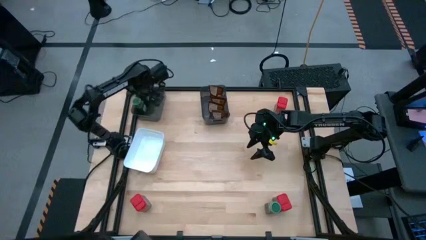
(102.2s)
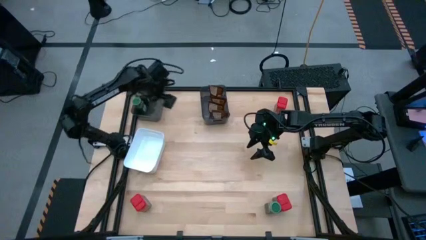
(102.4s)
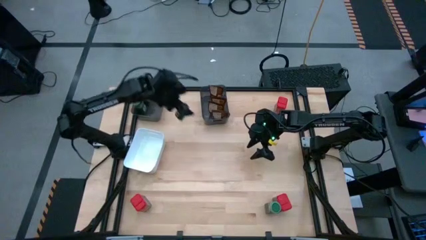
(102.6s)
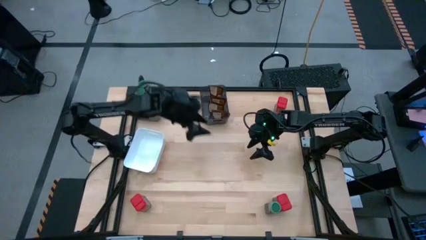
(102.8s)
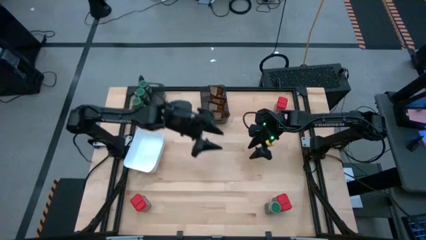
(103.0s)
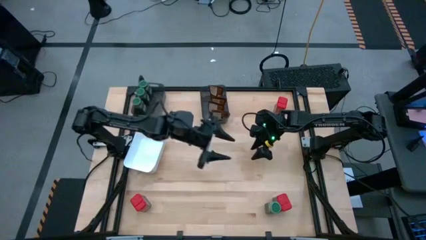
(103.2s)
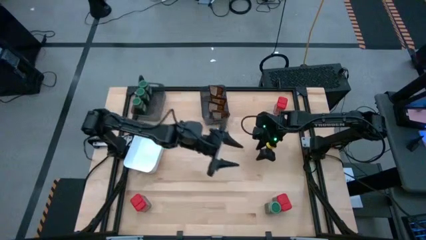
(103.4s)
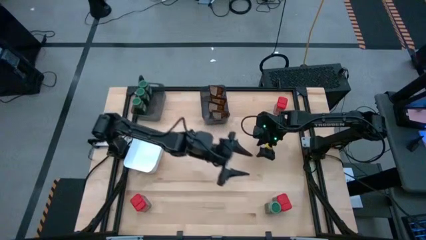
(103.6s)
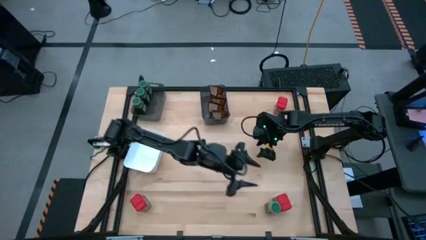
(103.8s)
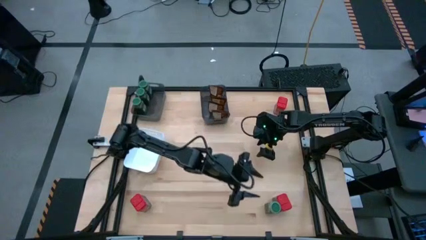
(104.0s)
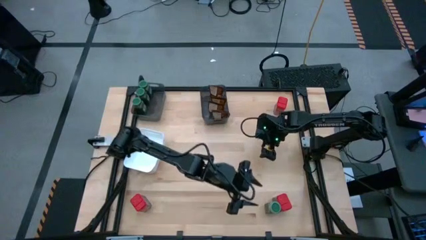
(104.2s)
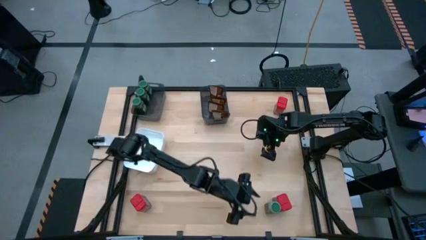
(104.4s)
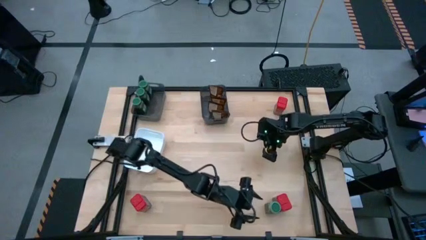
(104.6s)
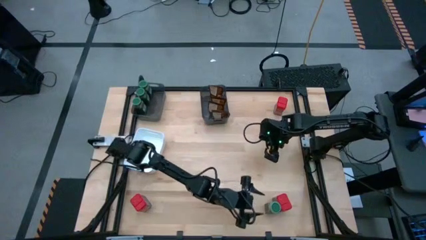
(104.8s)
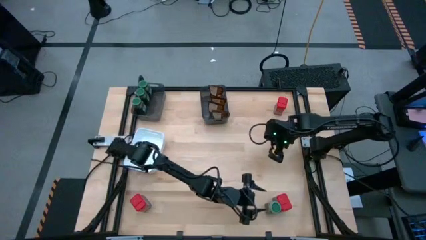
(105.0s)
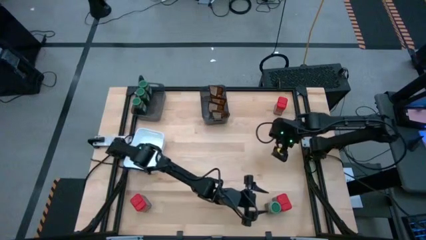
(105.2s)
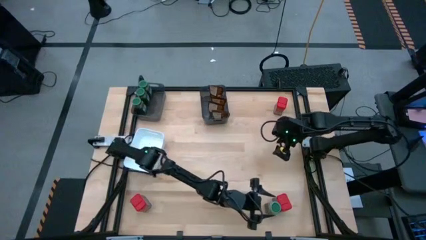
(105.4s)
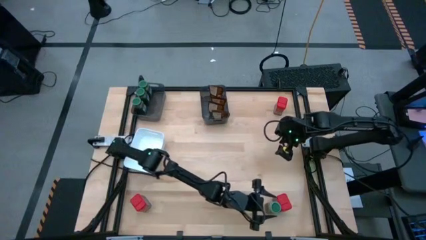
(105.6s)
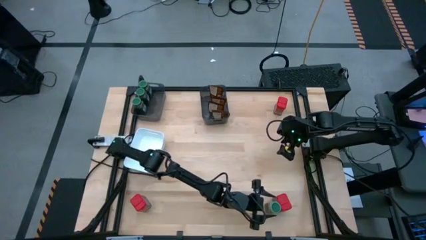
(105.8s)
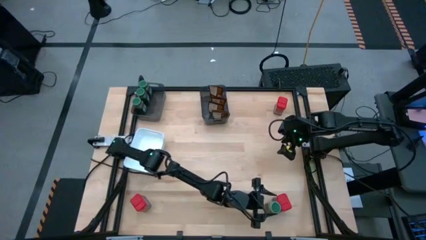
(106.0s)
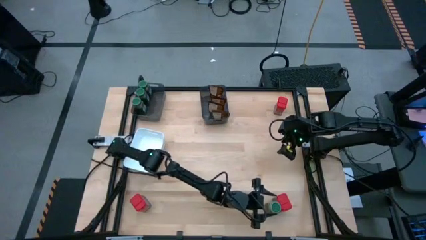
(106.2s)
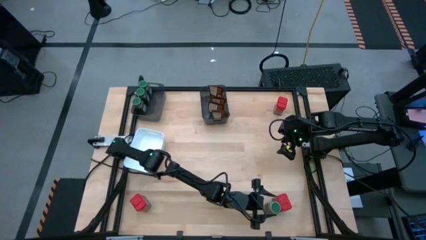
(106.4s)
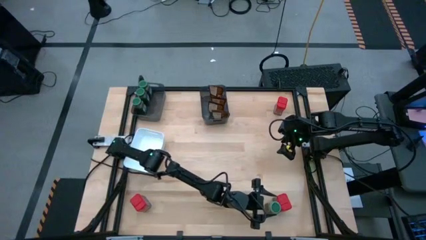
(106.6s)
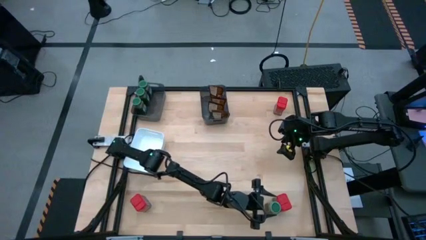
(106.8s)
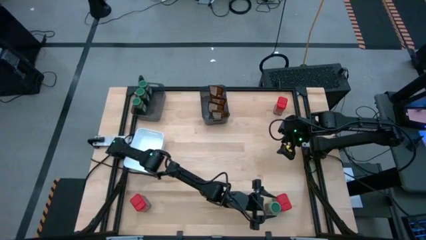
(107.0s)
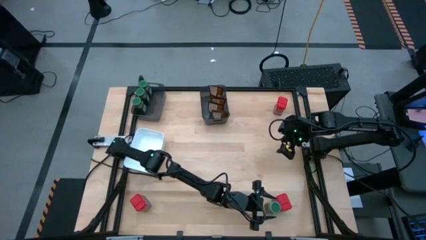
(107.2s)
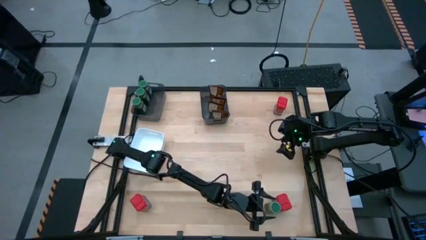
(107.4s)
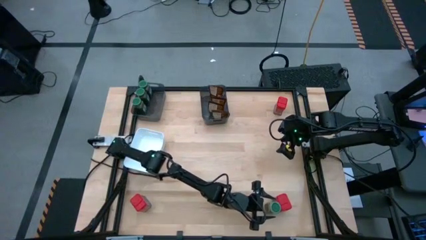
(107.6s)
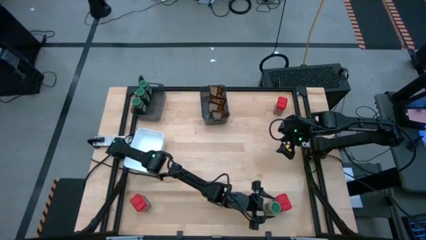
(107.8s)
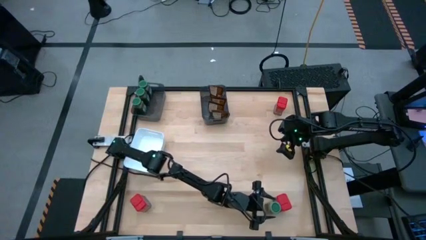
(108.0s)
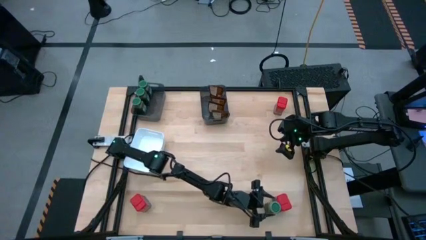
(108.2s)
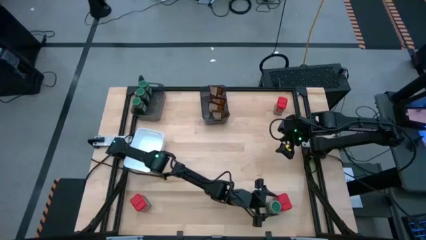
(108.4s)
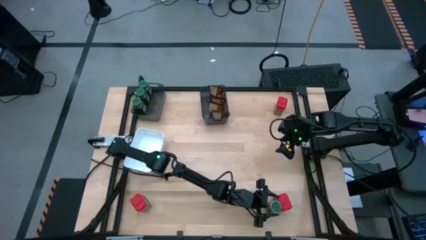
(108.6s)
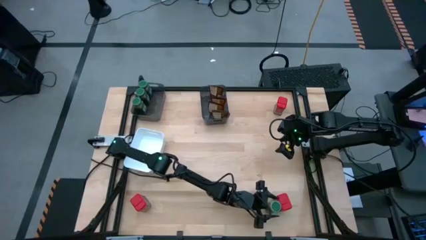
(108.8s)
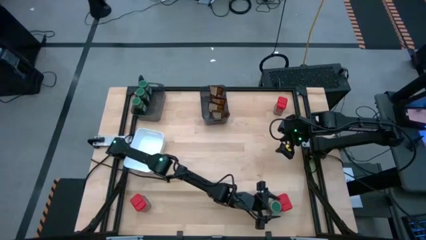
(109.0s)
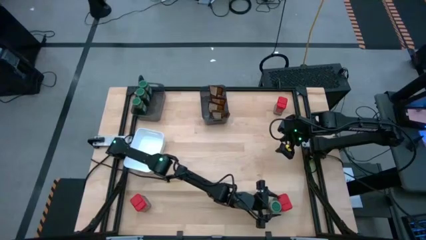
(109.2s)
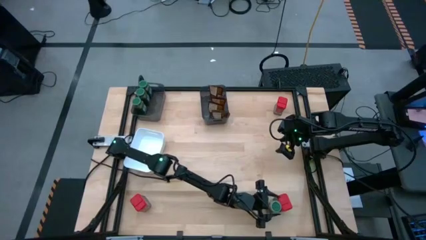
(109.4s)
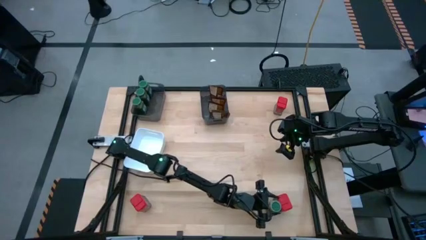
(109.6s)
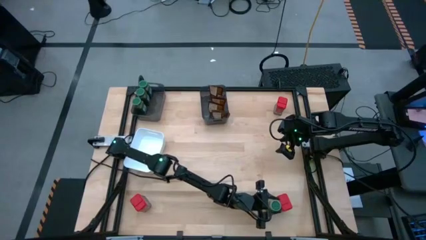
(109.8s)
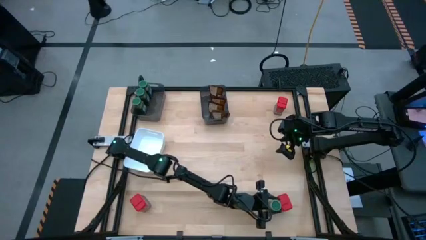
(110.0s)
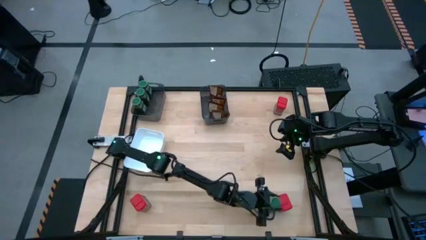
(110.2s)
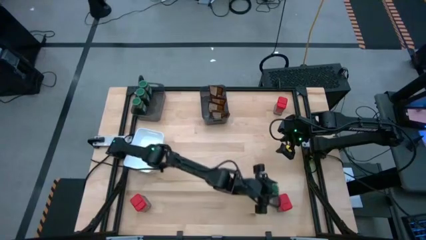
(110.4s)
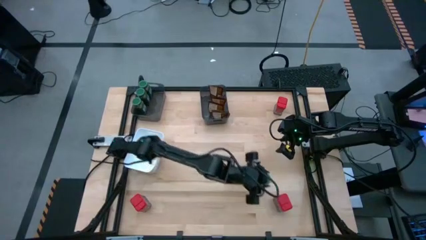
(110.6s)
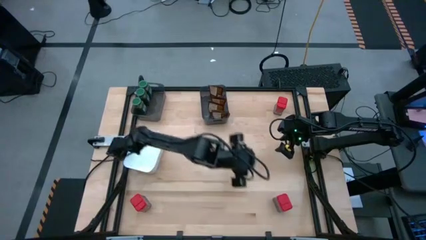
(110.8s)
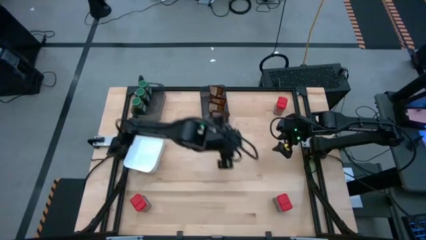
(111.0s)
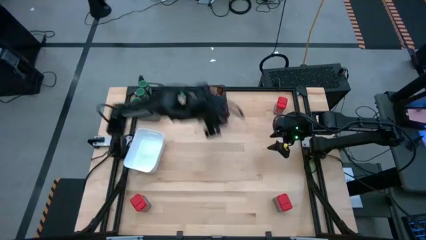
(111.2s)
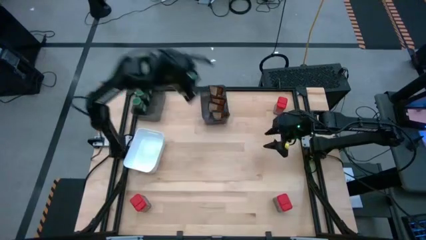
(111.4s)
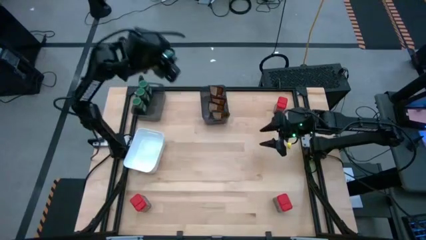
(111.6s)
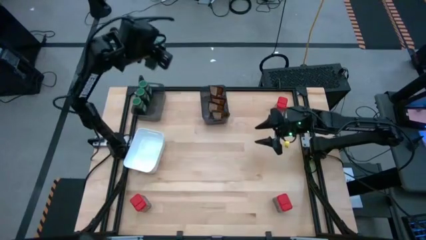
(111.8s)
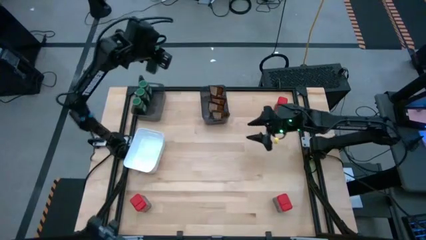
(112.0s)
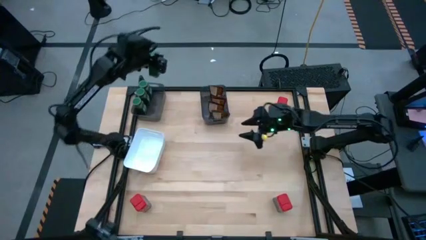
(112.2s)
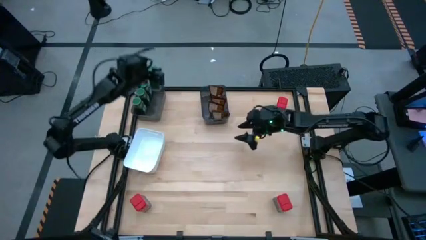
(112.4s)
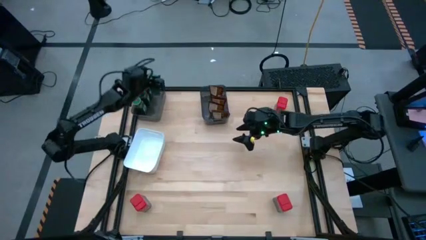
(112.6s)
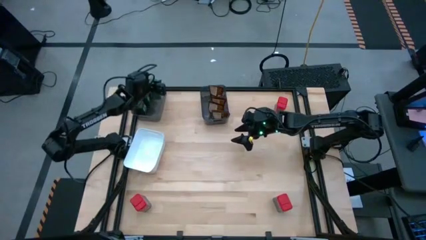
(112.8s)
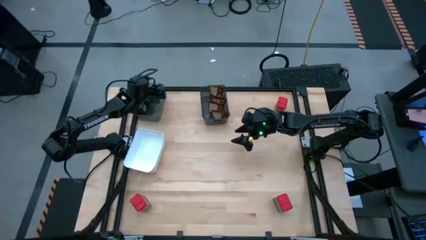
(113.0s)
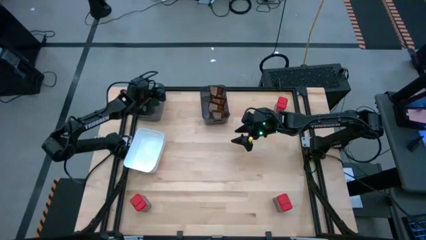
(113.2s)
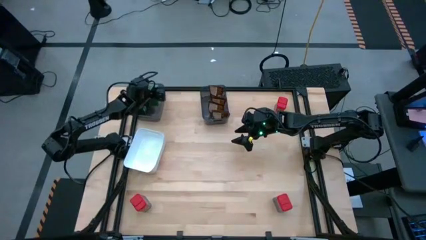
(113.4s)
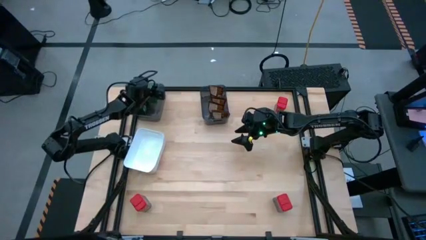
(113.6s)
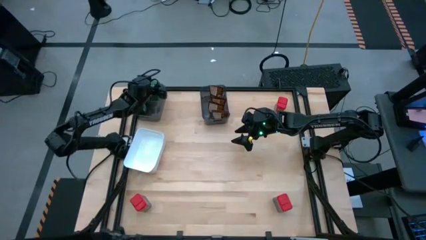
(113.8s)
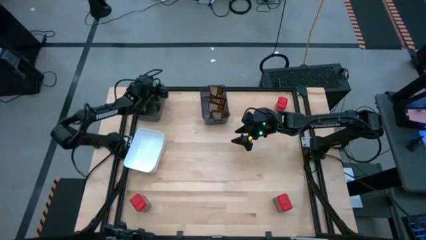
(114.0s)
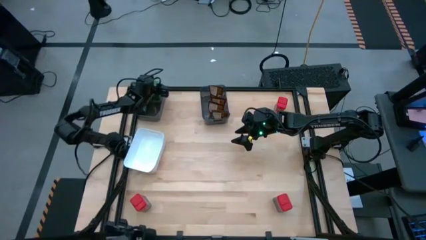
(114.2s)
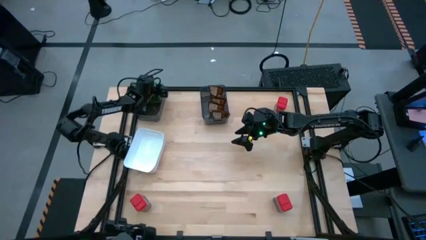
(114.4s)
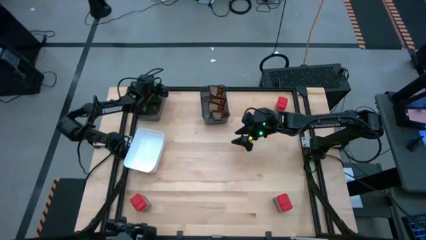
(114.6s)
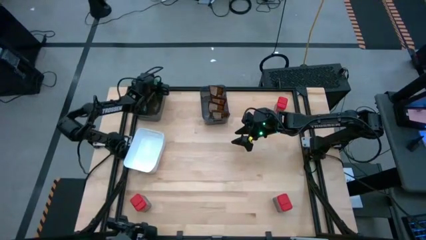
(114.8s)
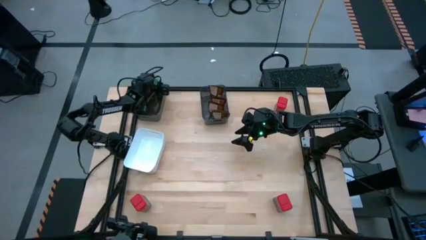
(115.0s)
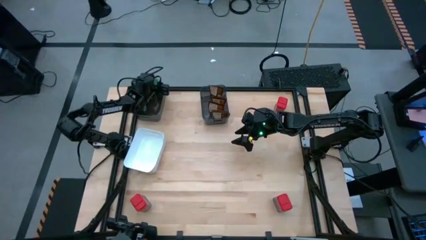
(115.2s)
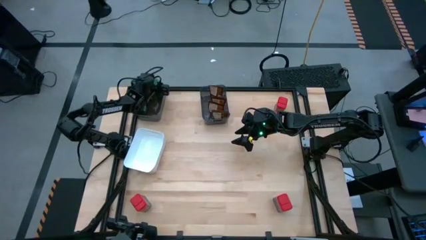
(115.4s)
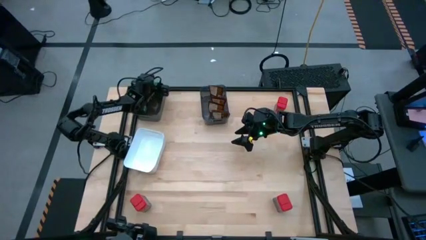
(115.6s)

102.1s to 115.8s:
Task: Sort spices by type
Put the green seasoning bottle into the left black bin

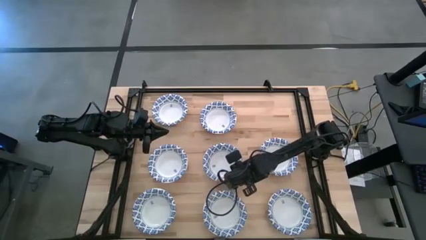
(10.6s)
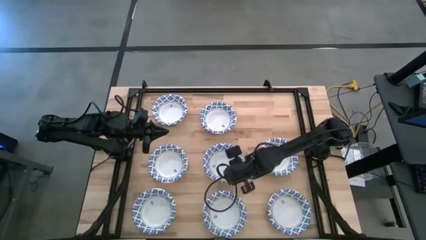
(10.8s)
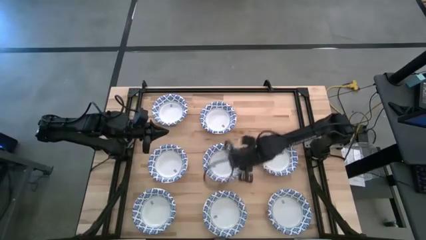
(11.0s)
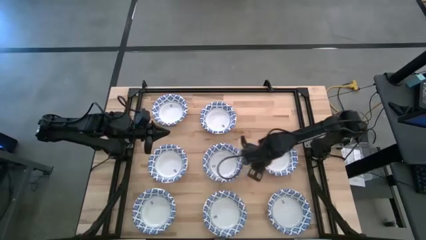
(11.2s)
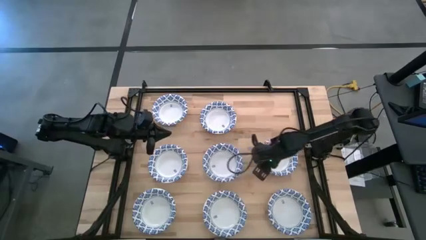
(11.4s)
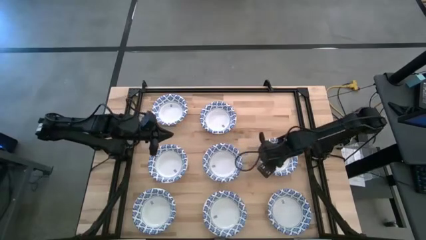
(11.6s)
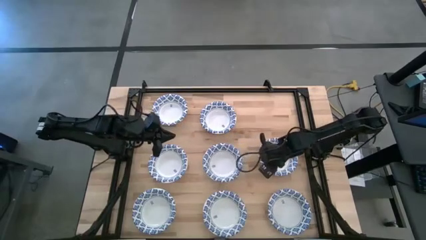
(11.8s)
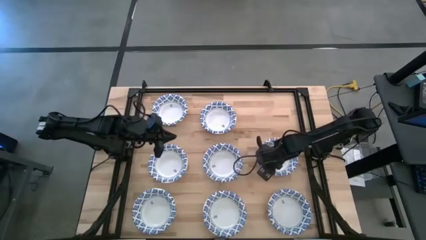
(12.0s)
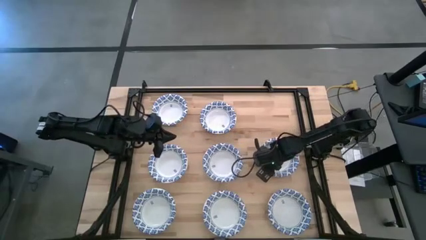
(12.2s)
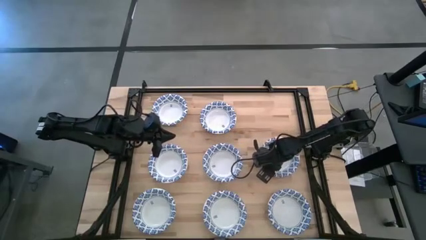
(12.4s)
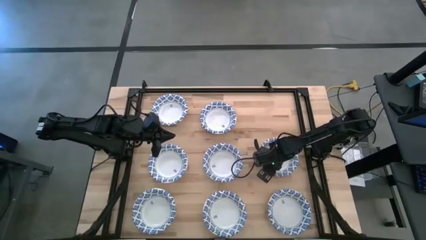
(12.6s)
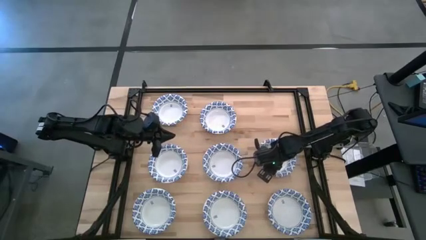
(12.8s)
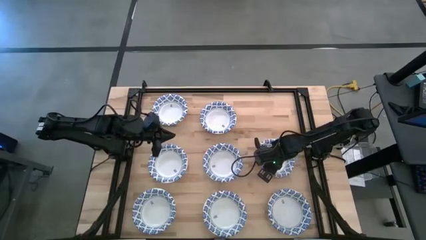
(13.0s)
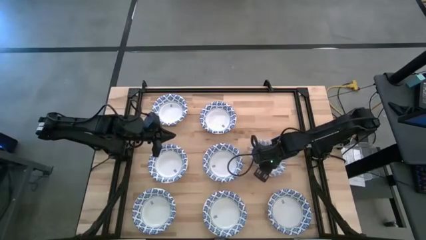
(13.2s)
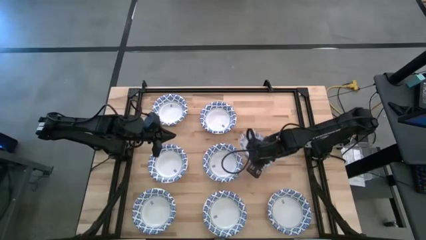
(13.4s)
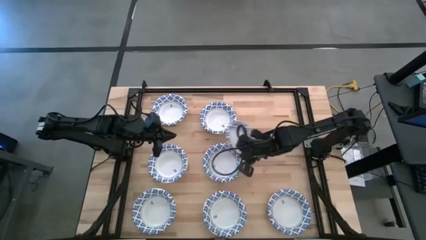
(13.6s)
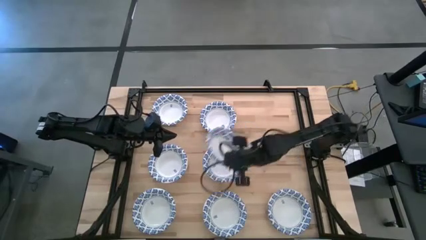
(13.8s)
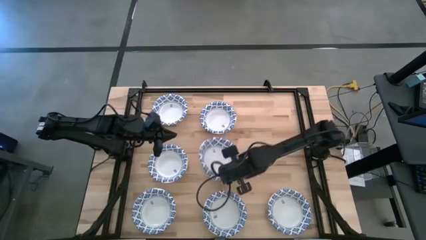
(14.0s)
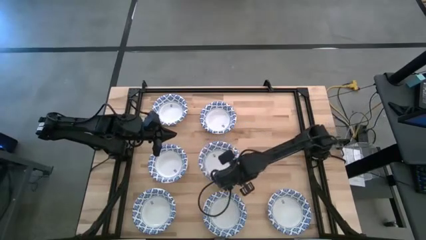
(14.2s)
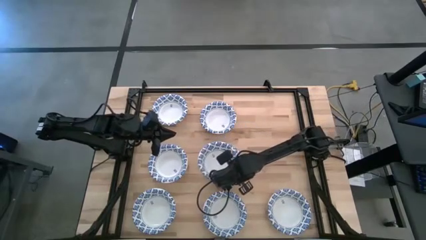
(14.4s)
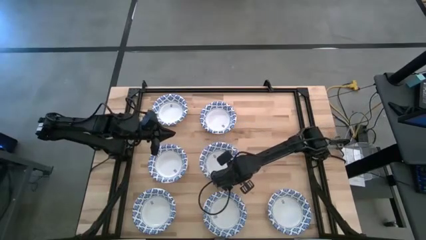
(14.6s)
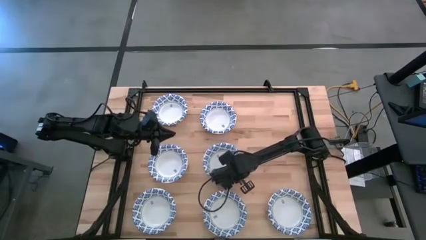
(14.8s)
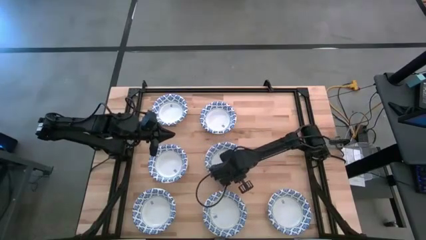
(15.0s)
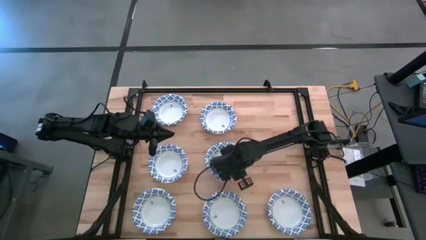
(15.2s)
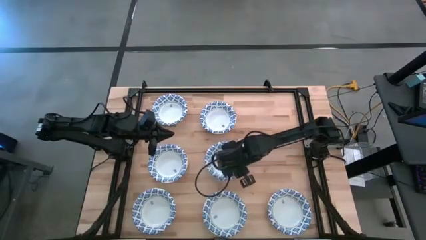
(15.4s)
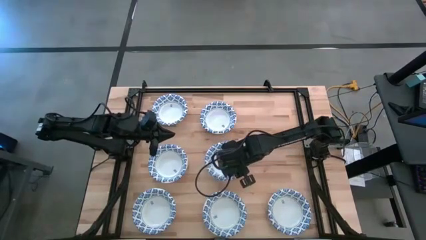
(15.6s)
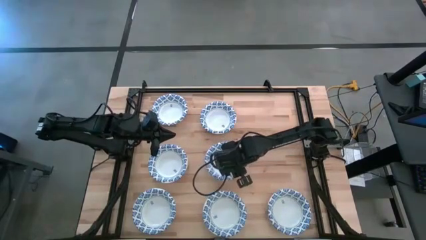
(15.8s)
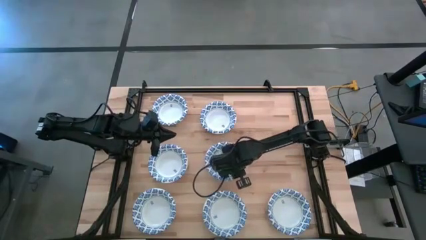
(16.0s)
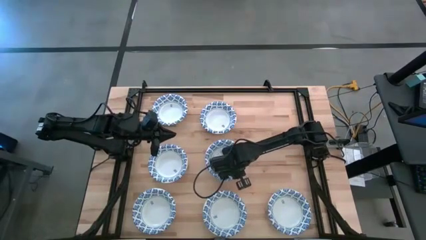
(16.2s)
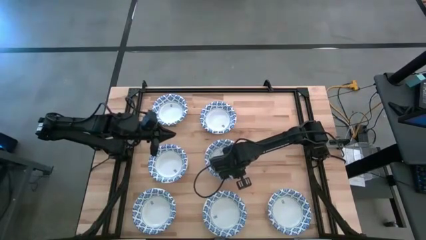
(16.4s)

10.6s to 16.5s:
Task: Nest bowls inside each other
Stack the white patterned bowl on top of the other white patterned bowl
